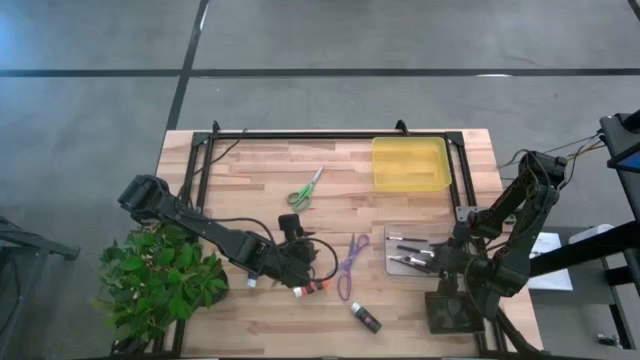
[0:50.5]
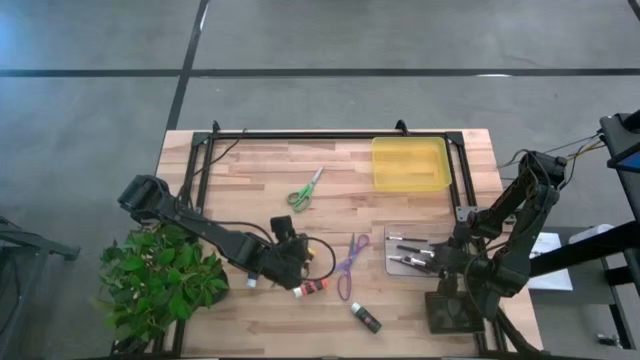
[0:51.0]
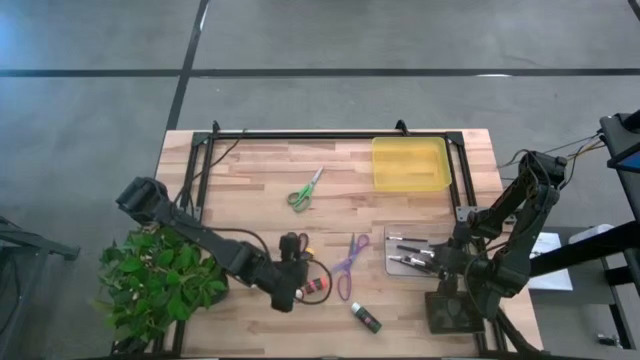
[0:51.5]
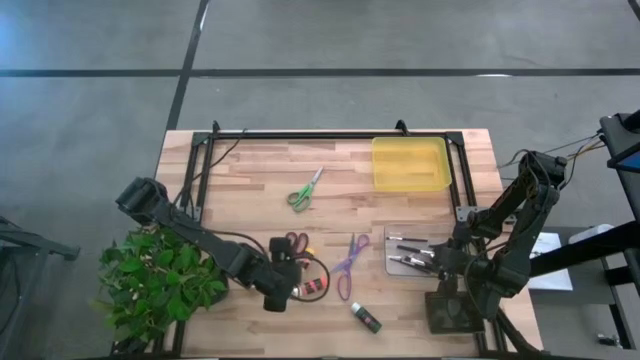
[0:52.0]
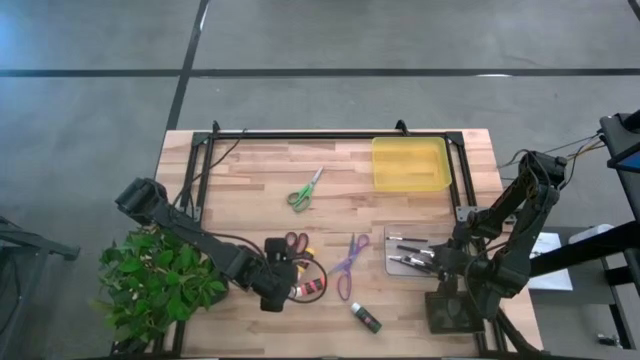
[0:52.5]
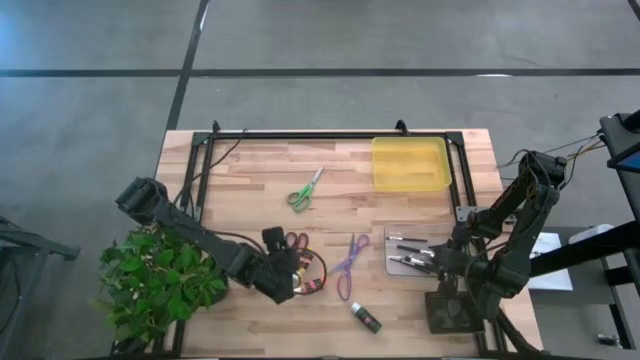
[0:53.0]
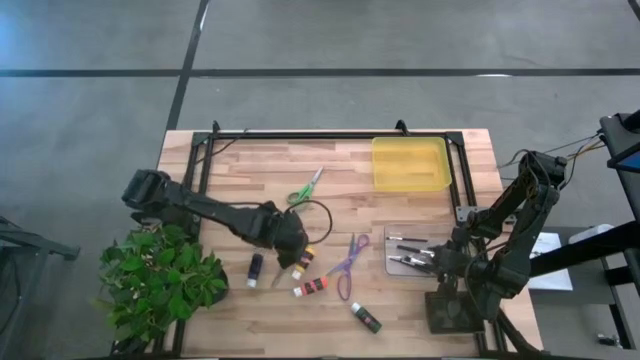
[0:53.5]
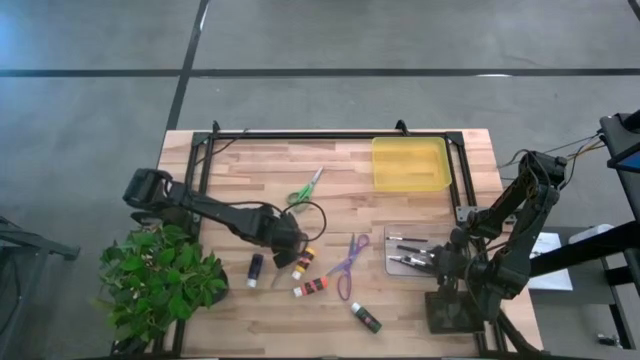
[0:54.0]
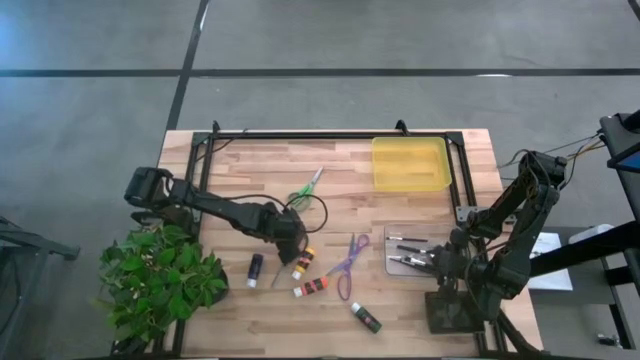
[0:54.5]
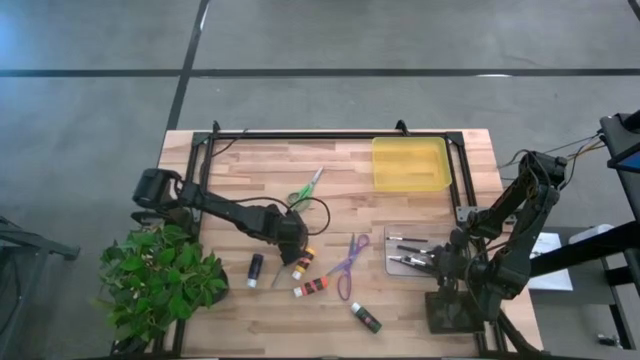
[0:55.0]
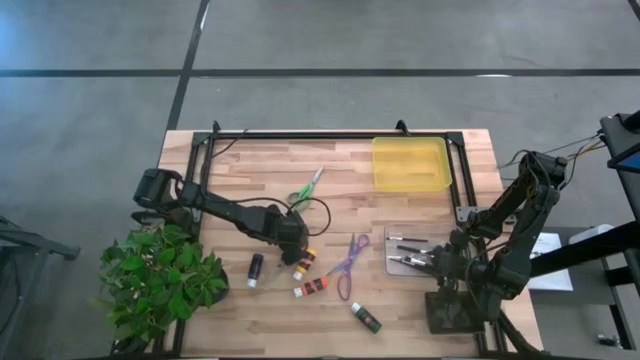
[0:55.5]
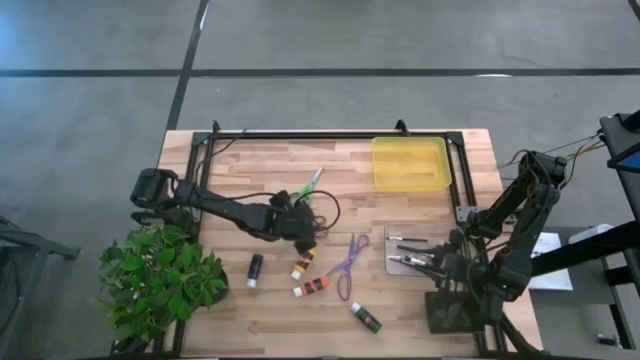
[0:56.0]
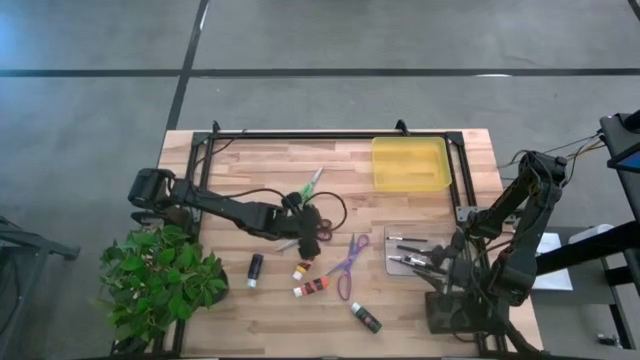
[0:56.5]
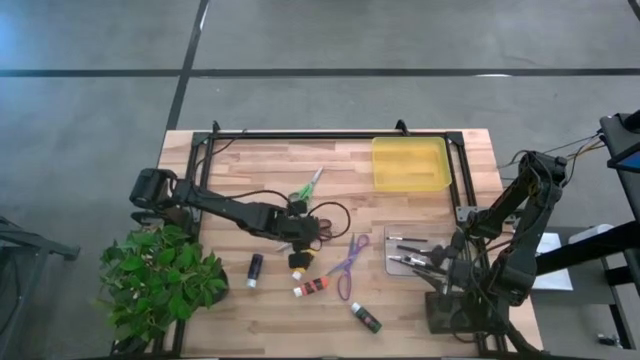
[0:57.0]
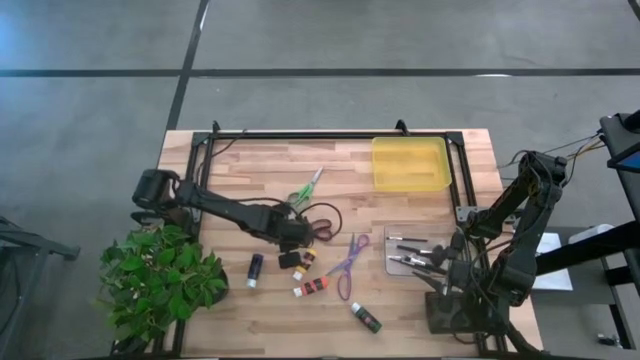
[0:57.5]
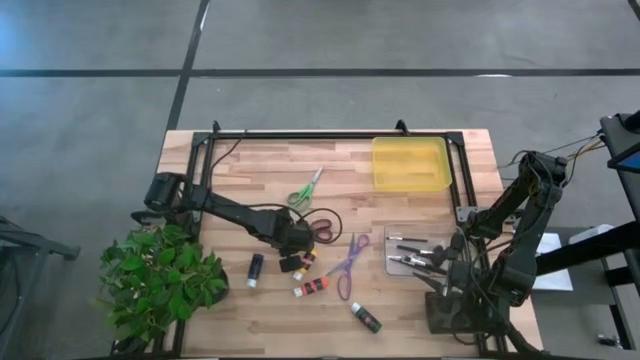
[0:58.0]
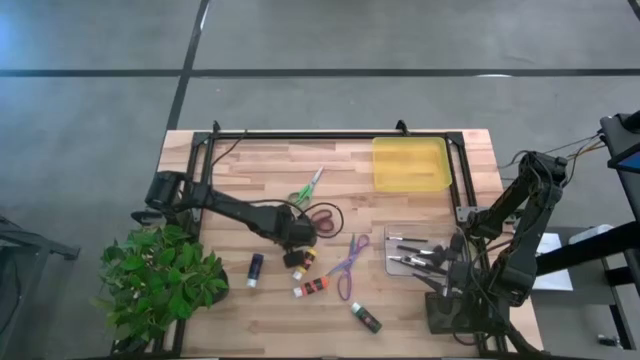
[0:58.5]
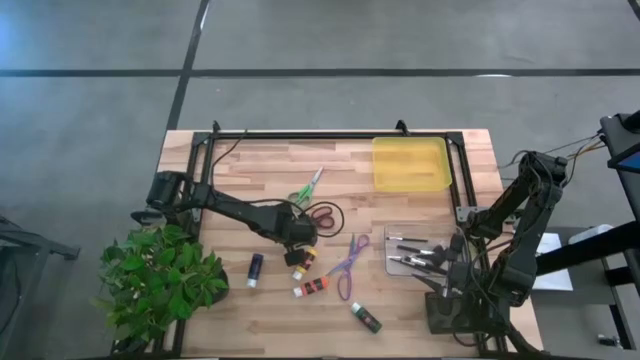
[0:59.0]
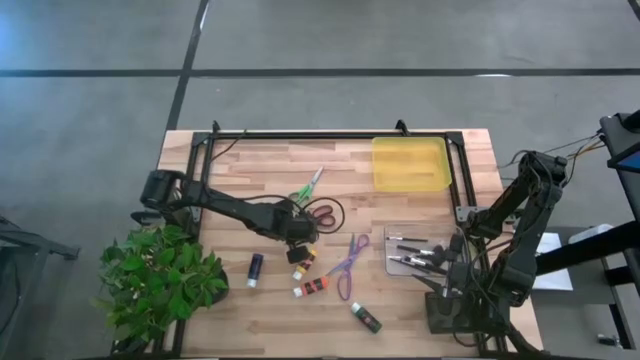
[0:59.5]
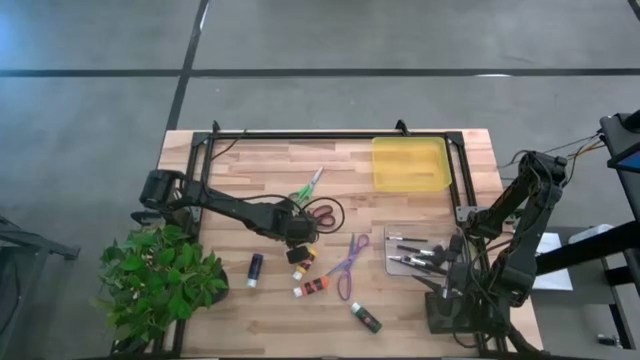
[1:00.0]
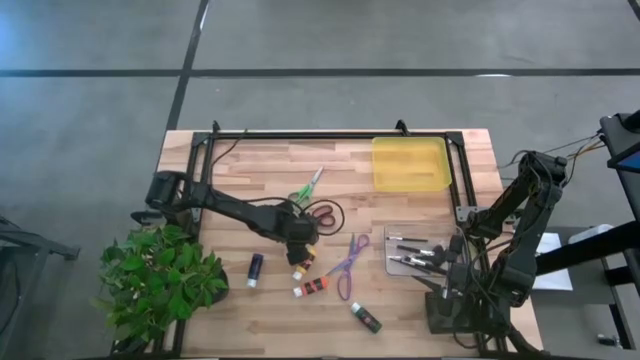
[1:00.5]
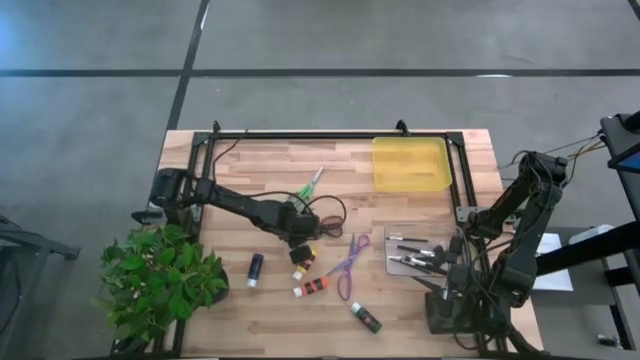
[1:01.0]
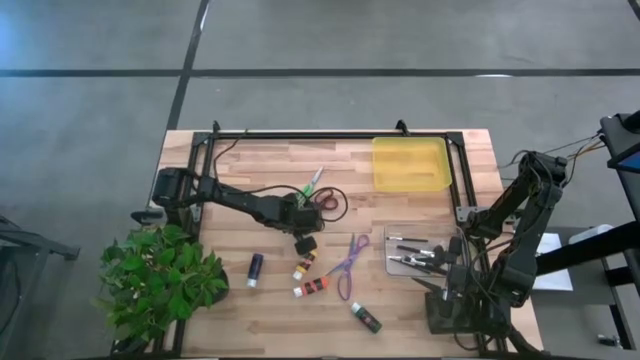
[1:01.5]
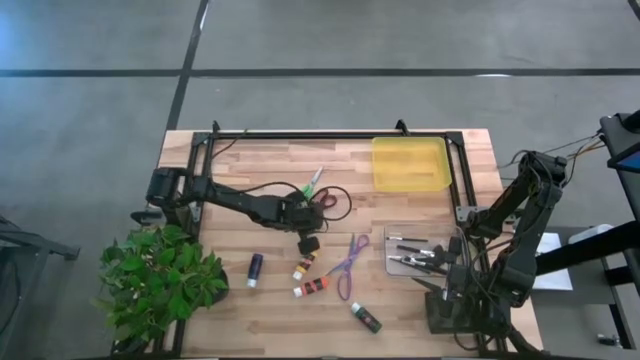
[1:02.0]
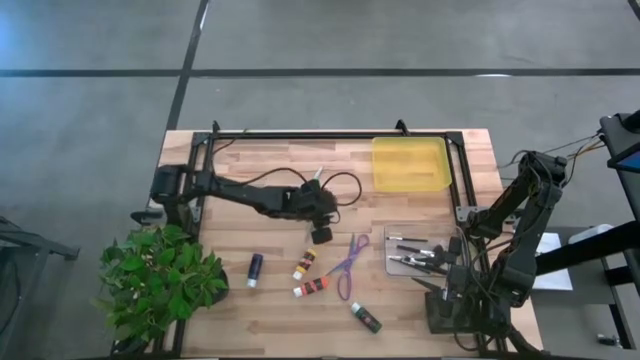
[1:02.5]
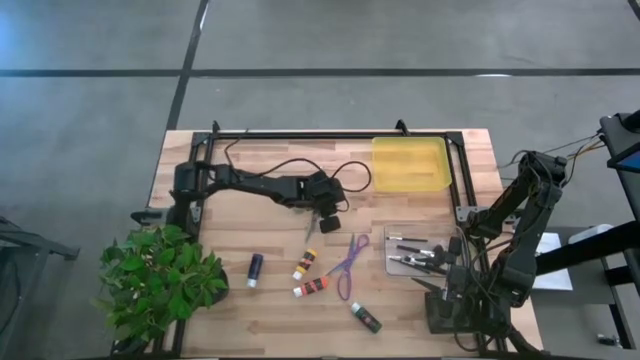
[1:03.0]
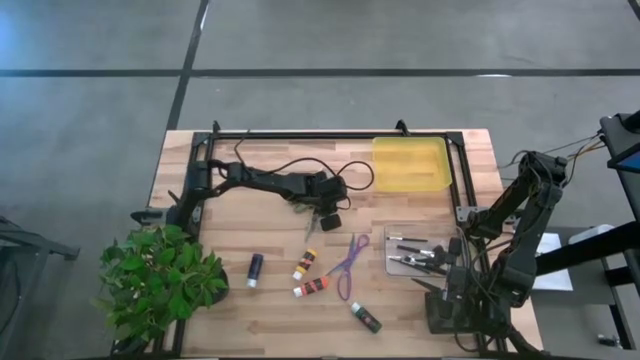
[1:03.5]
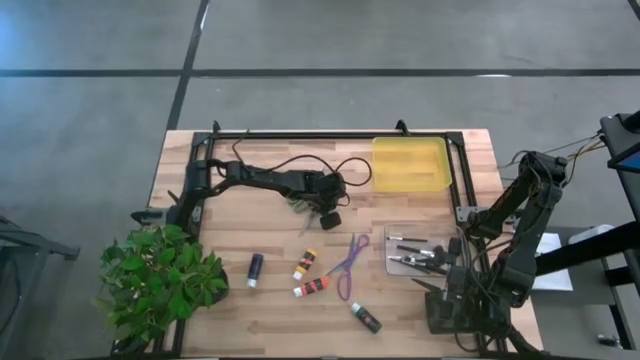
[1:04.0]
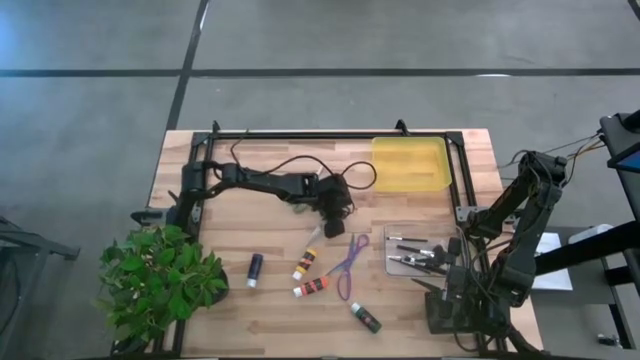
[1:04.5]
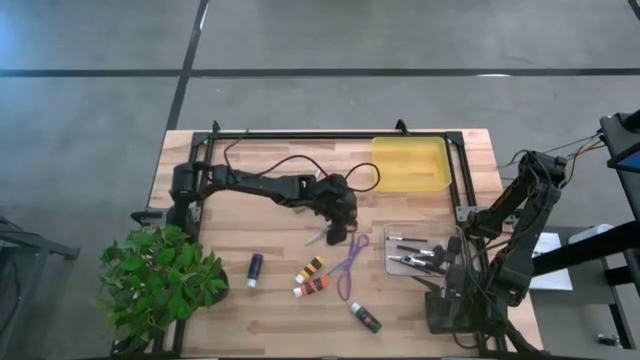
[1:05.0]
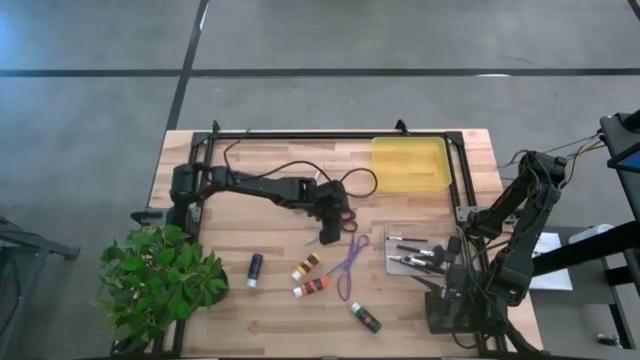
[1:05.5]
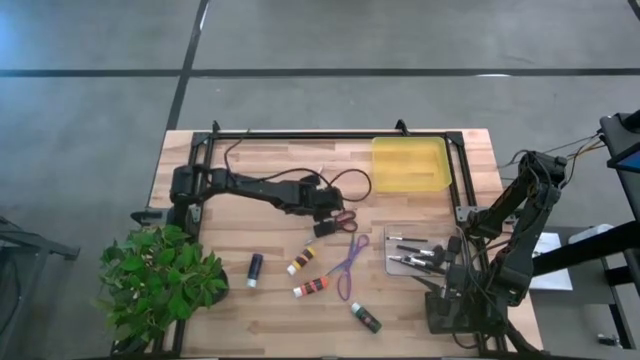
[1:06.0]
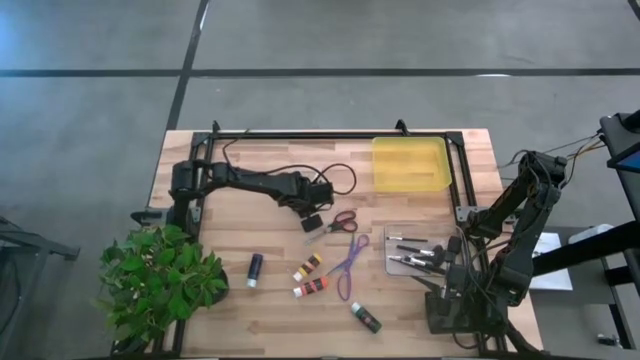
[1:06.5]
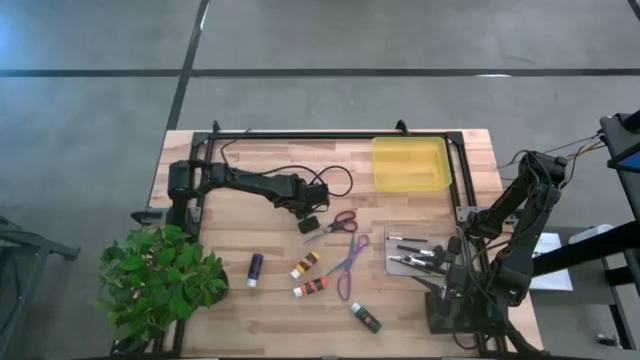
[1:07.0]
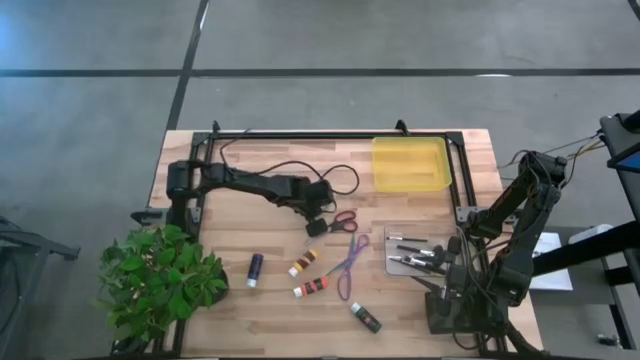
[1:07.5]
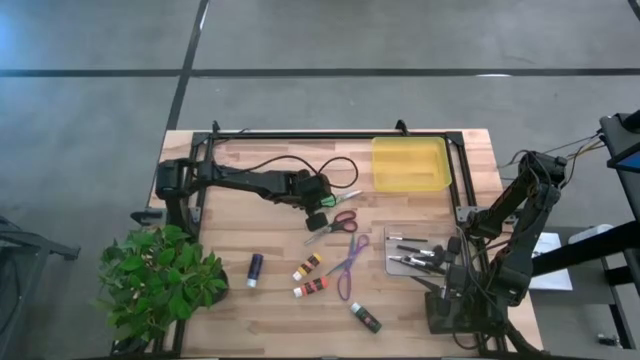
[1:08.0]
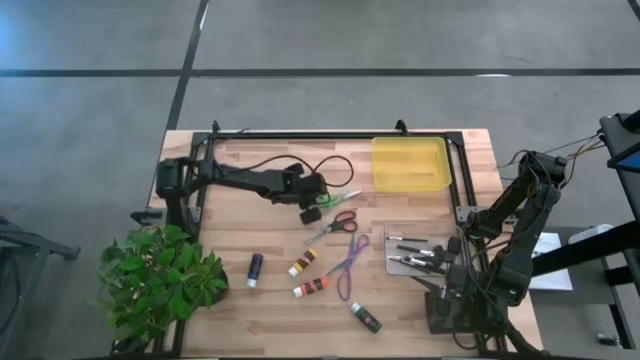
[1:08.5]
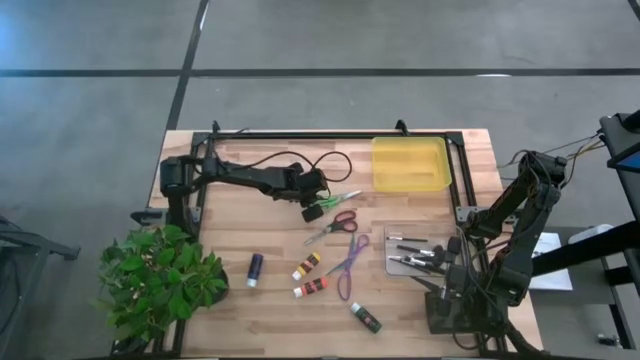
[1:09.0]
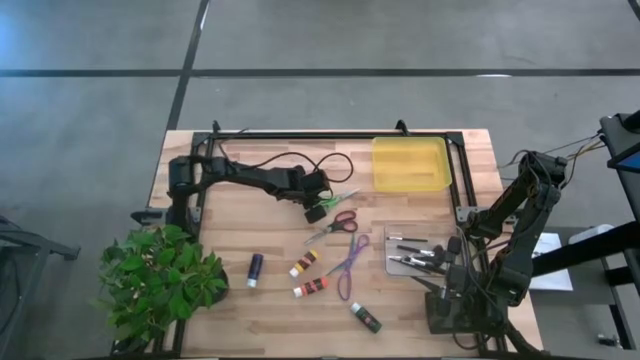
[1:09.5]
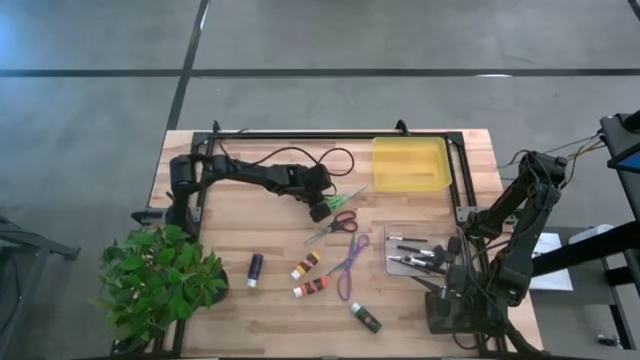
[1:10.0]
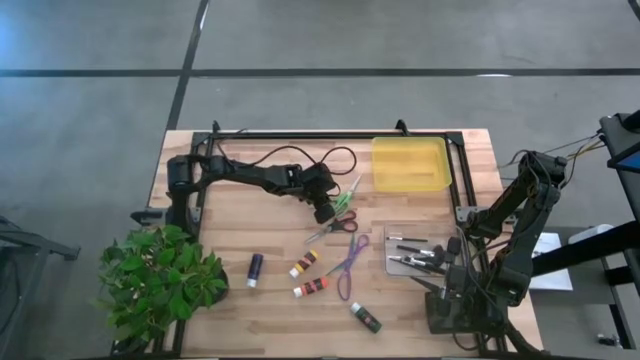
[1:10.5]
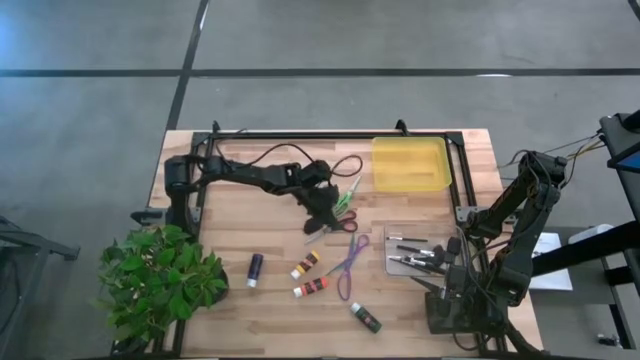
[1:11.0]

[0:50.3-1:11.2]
Task: Pick & Place Paint Supplies
Put the black scissors into the yellow bin
